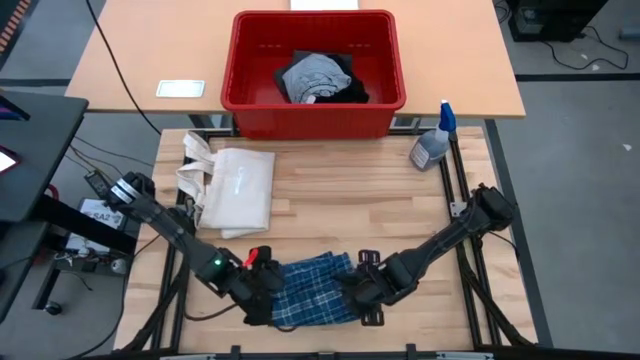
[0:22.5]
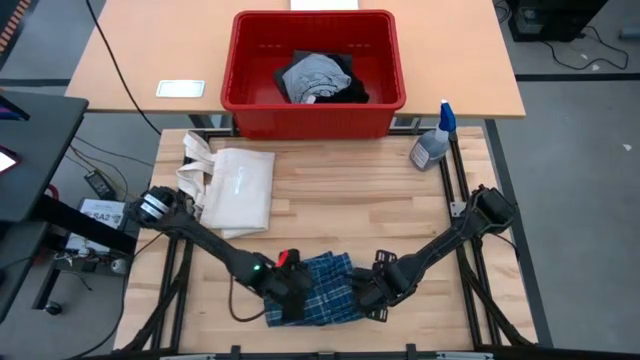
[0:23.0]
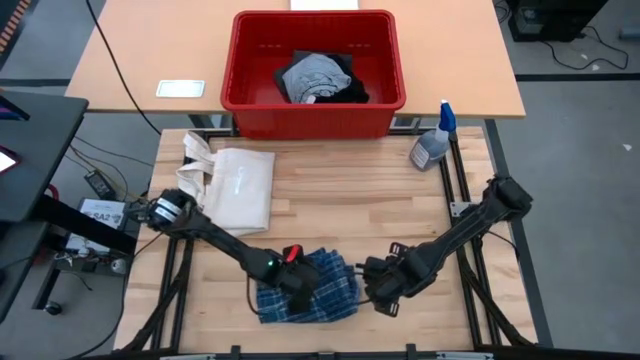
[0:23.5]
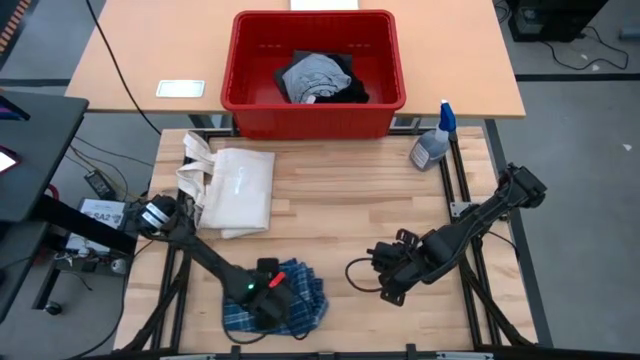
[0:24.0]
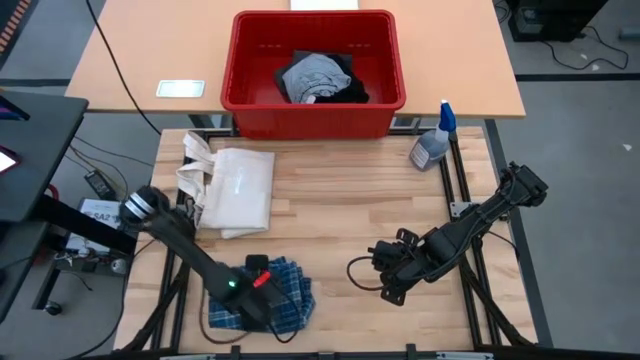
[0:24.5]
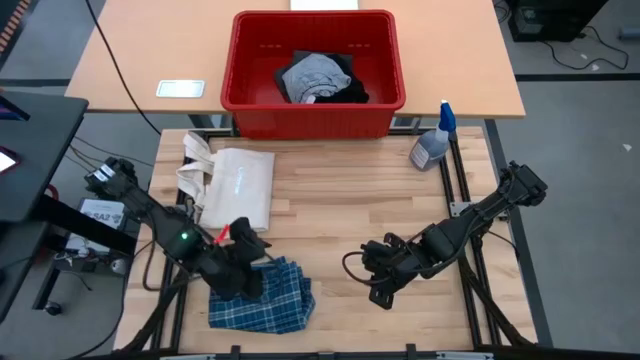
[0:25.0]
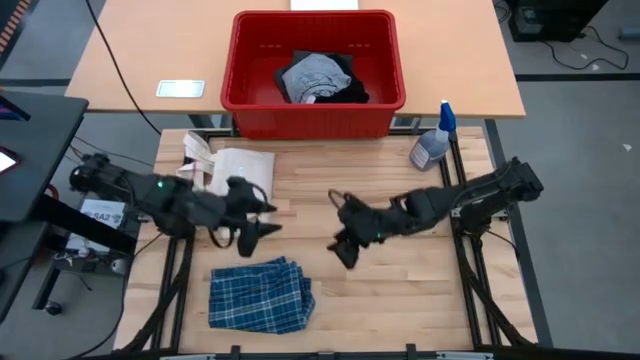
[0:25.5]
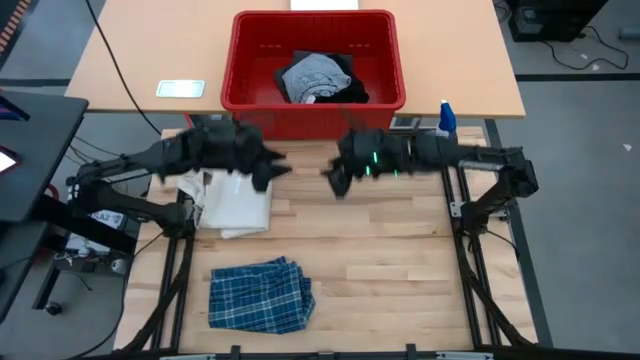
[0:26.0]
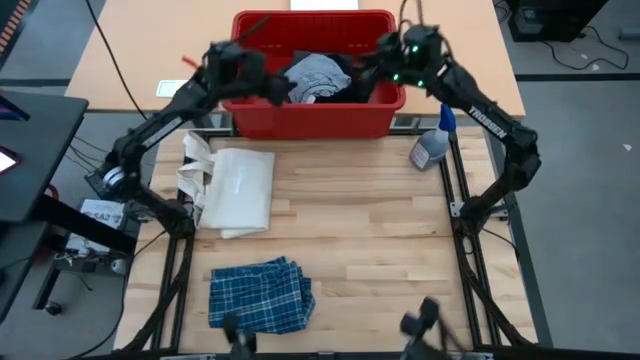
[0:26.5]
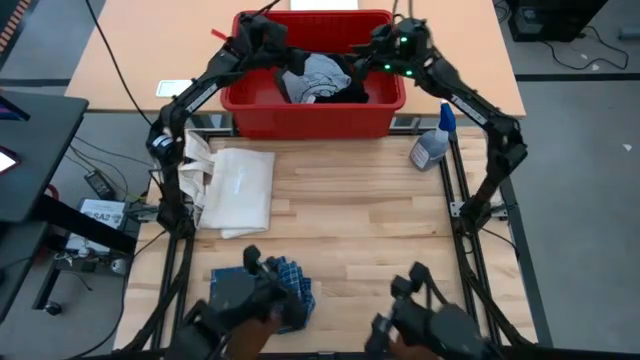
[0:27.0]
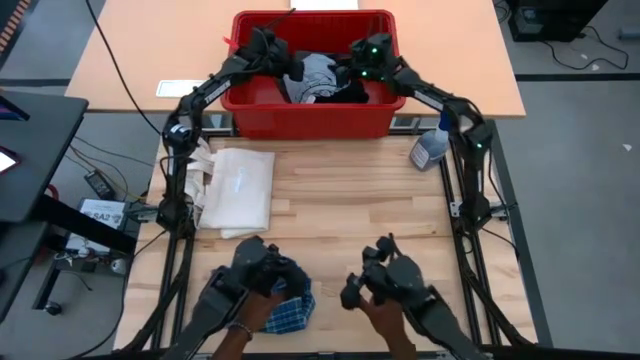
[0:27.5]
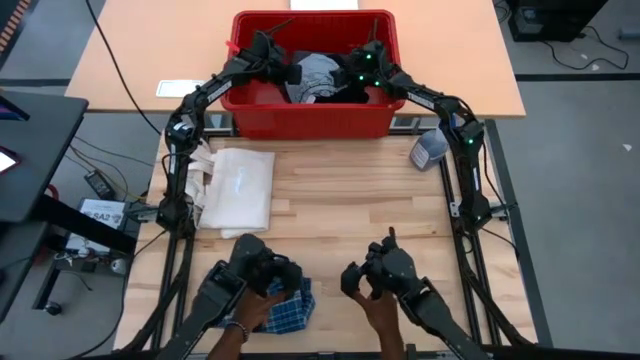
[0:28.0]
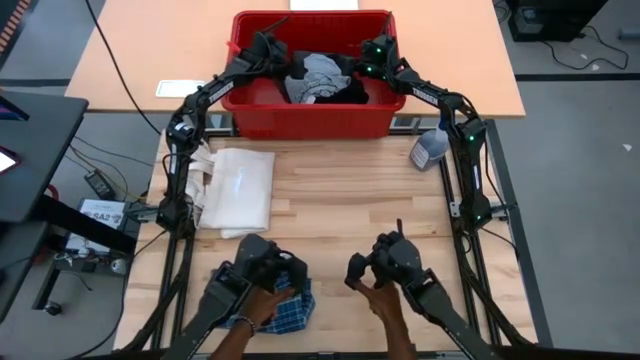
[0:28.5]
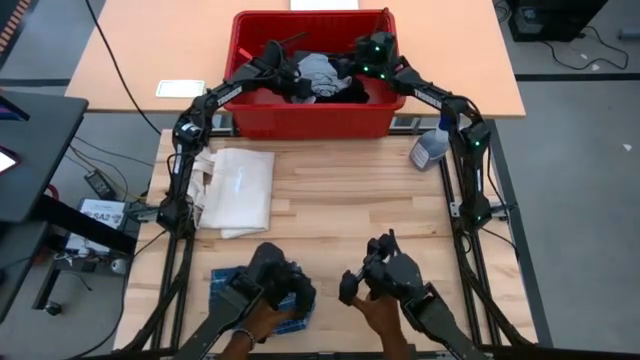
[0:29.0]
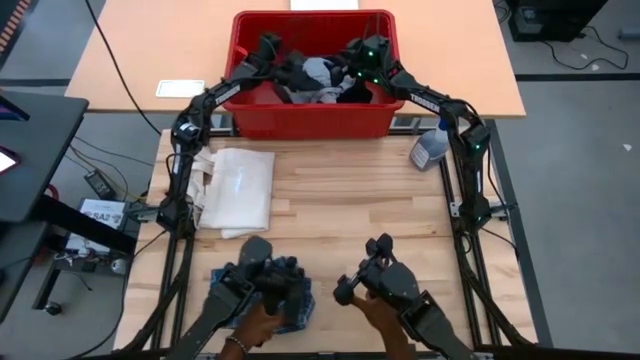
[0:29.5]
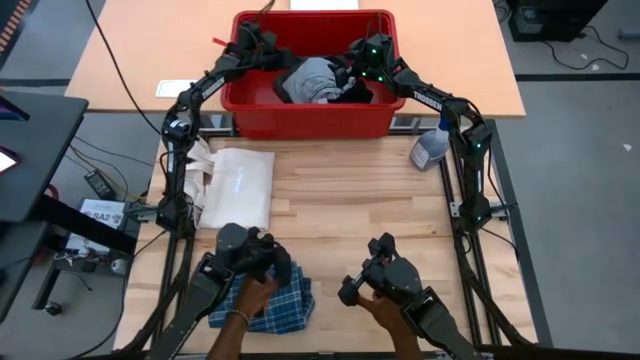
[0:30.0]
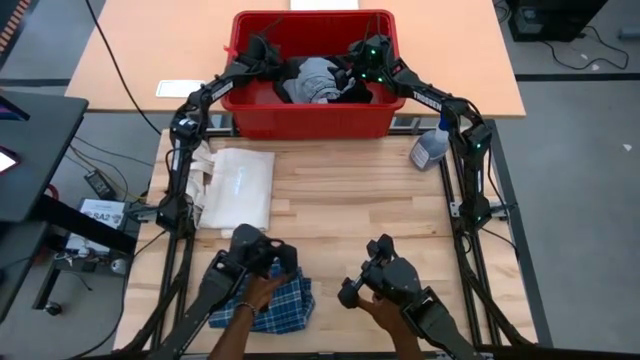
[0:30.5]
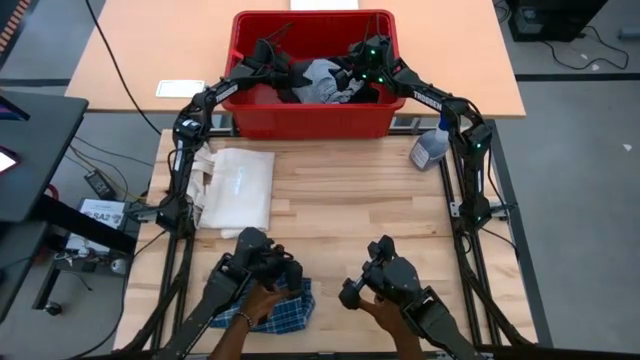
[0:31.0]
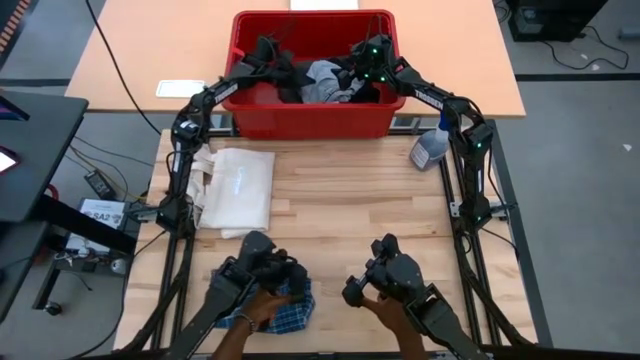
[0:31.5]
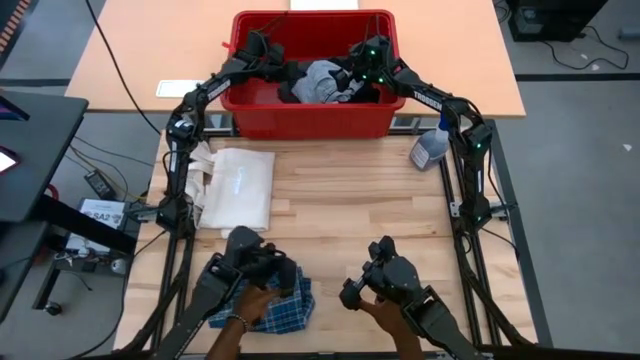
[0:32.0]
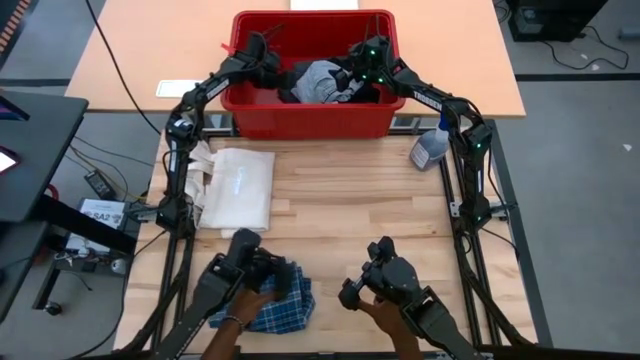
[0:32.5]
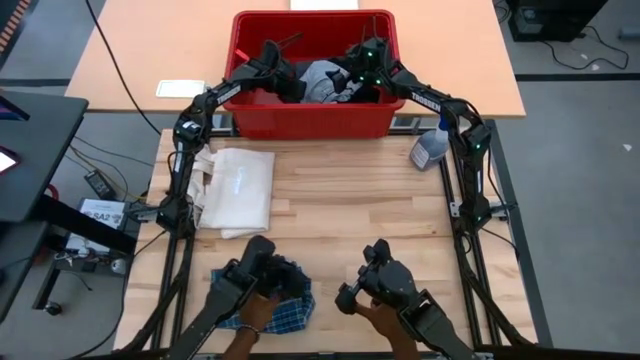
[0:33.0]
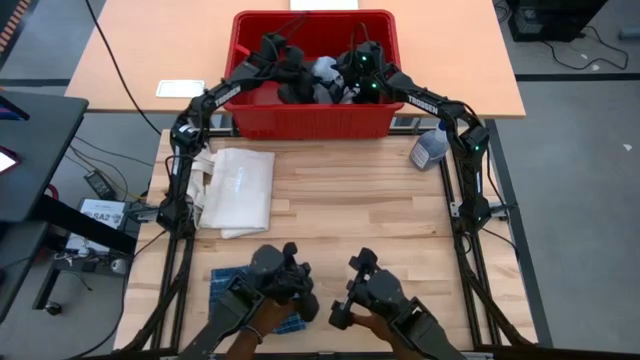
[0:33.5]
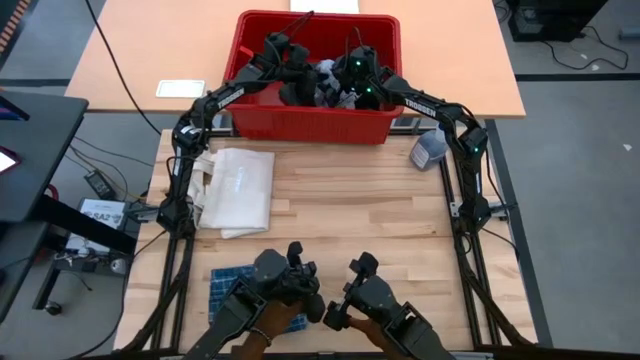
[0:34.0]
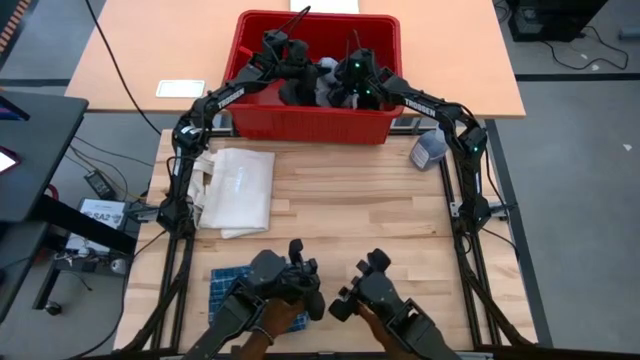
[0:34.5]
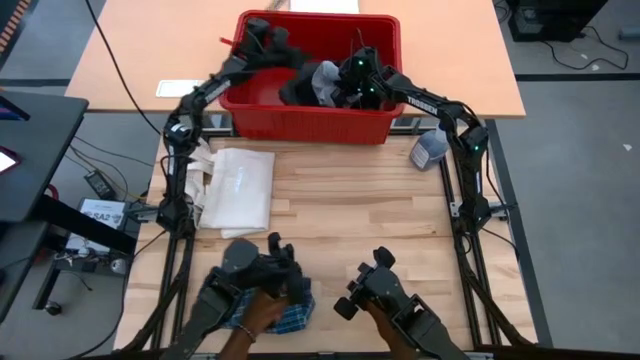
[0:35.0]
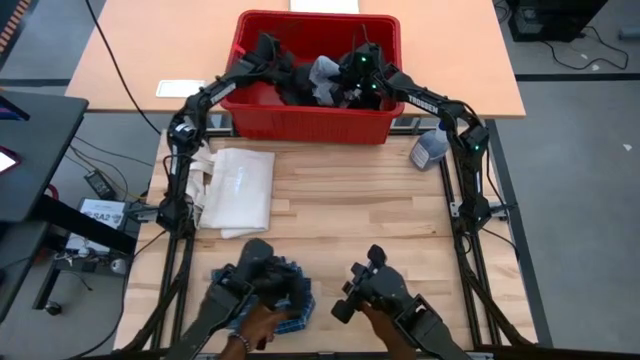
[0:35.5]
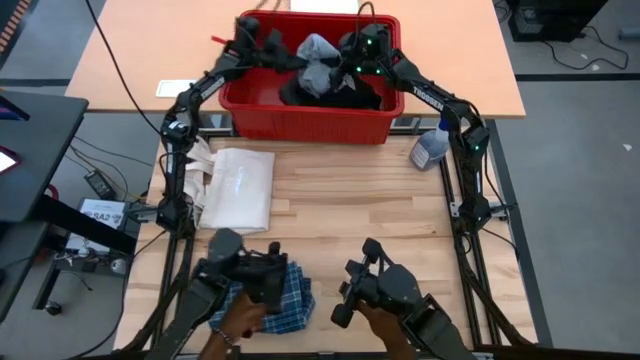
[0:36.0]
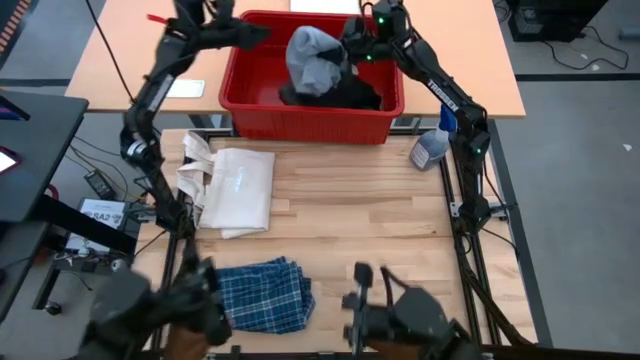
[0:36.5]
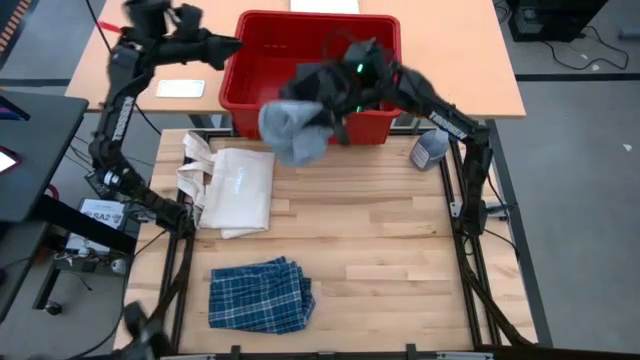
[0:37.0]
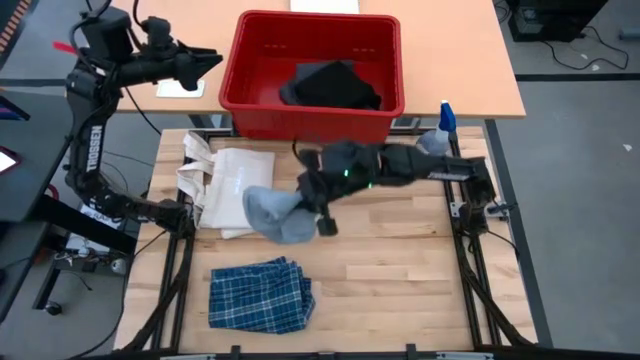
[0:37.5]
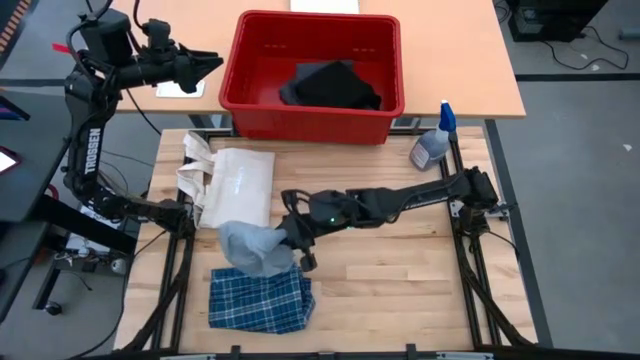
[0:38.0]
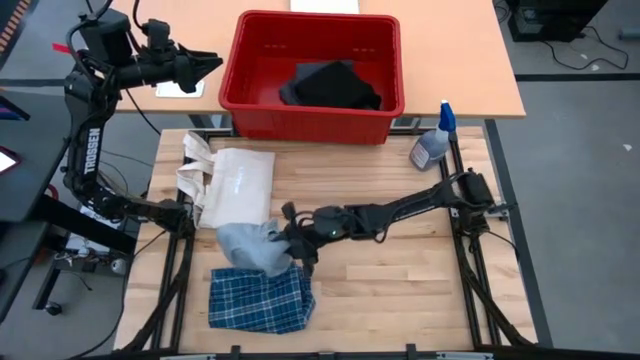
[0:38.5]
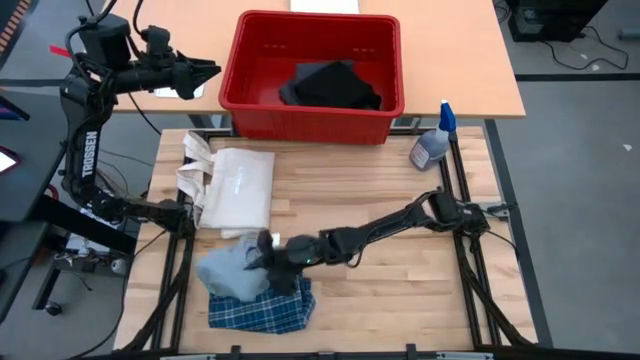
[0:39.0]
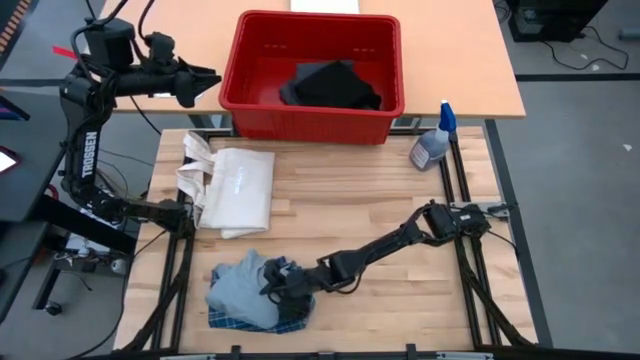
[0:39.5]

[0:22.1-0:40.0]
Task: Sort clothes
Remove the gray shirt from the red bin

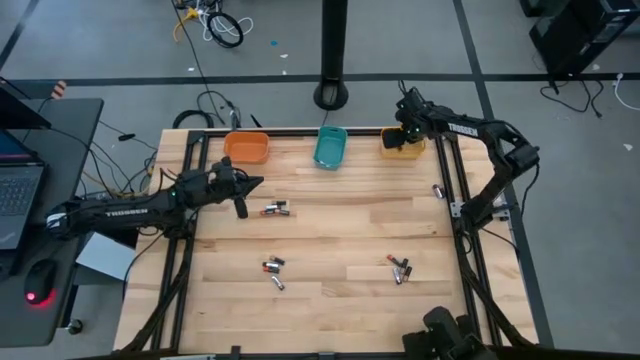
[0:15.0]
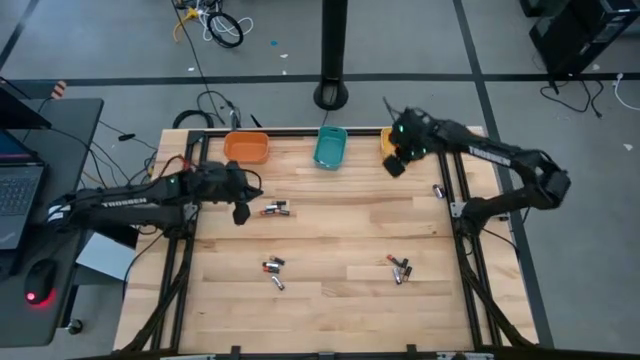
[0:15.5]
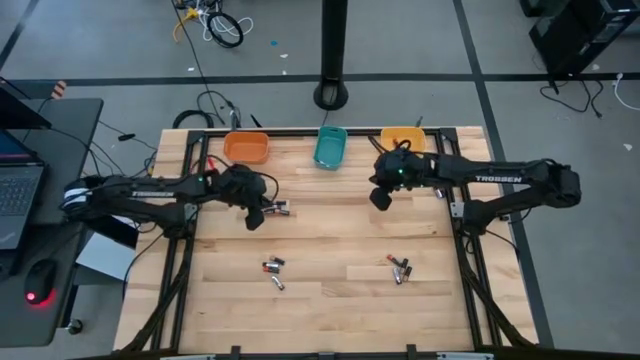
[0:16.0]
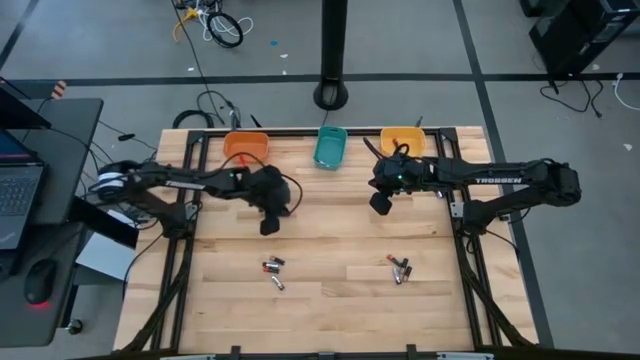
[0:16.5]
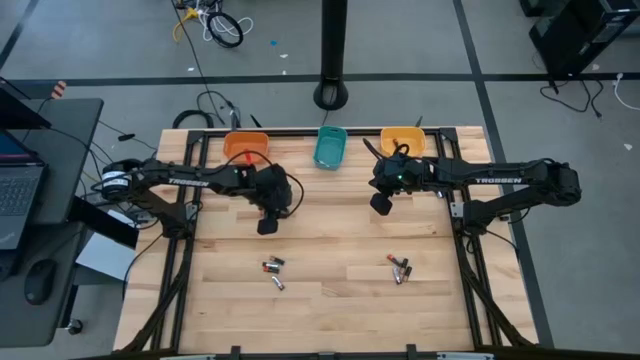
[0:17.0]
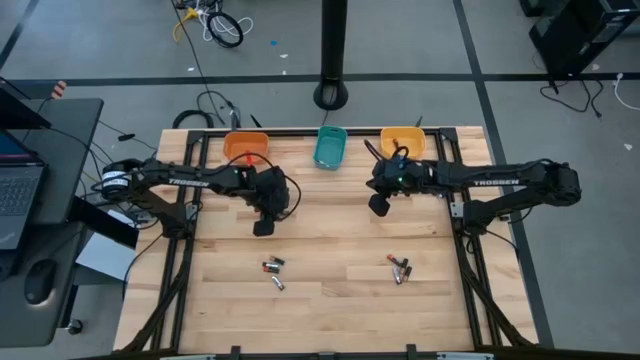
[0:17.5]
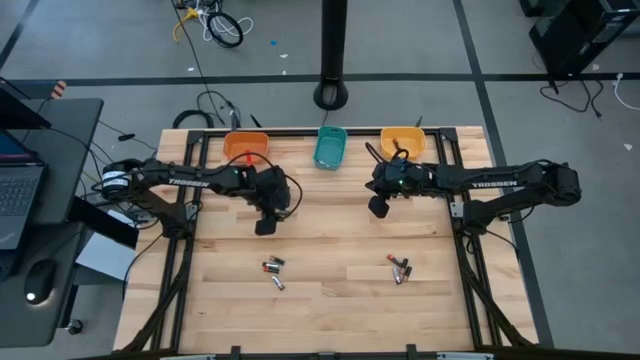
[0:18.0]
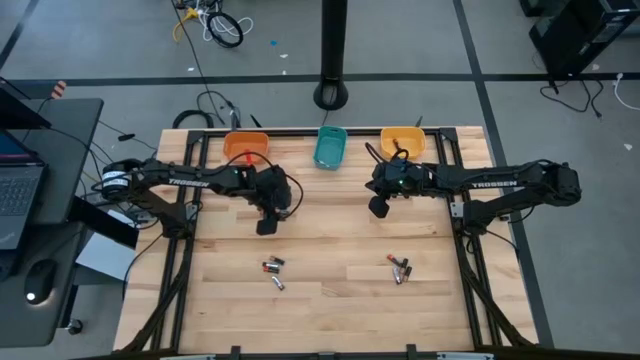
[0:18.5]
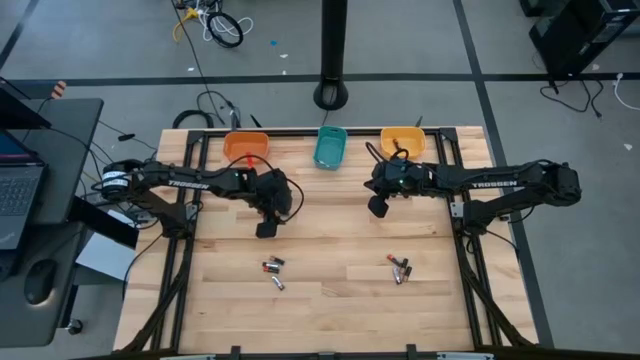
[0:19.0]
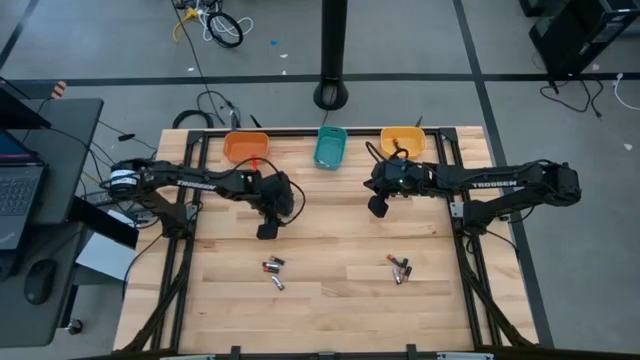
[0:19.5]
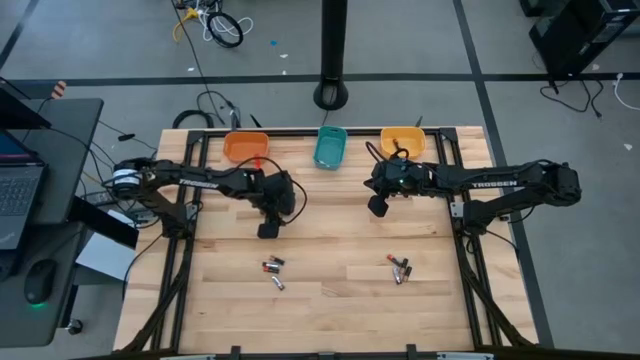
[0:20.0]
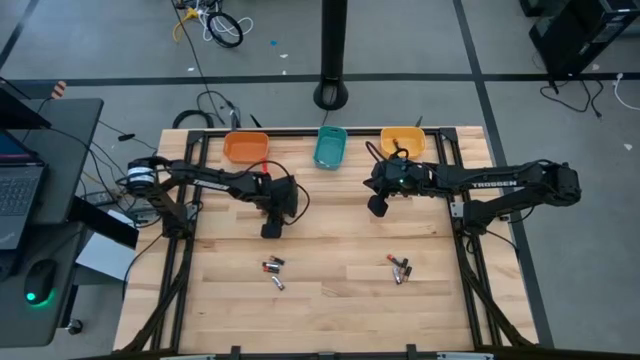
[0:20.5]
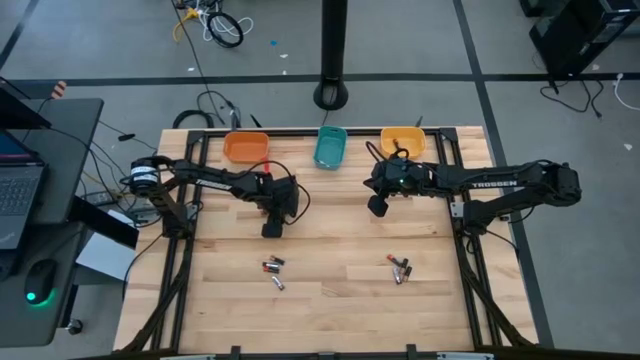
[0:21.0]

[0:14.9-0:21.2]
Task: Sort batteries
Put the brown-black battery in the orange bin
